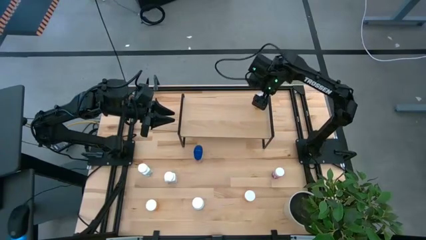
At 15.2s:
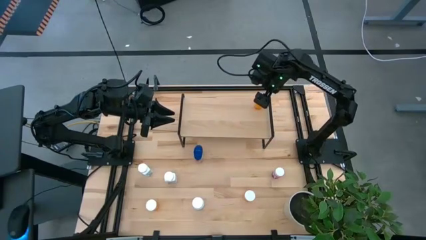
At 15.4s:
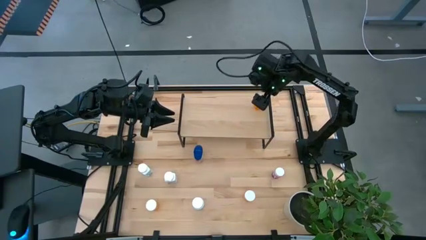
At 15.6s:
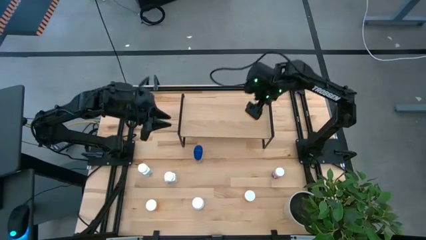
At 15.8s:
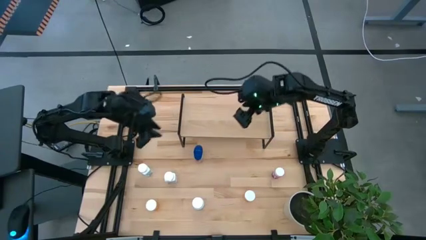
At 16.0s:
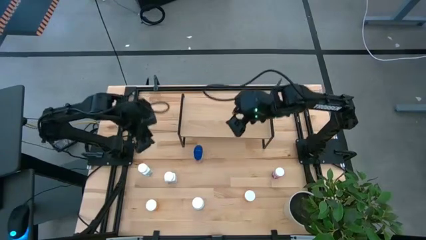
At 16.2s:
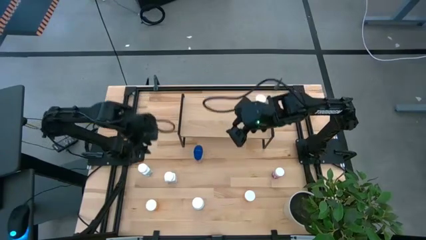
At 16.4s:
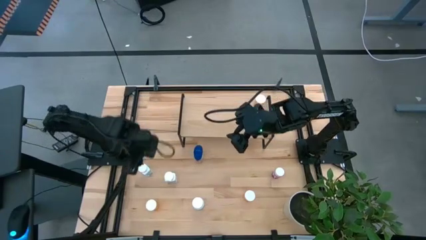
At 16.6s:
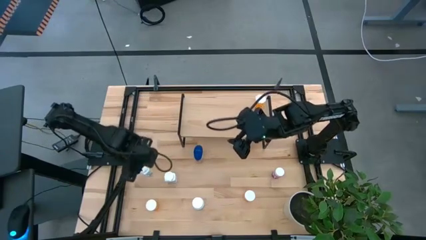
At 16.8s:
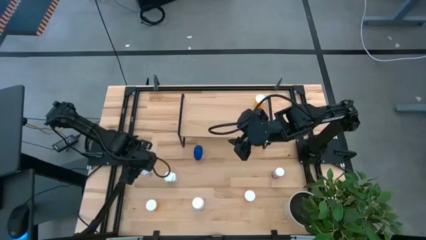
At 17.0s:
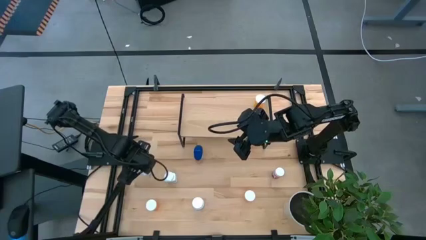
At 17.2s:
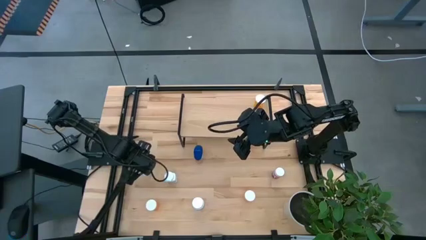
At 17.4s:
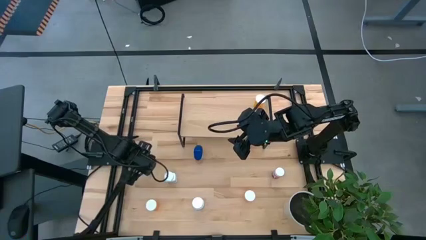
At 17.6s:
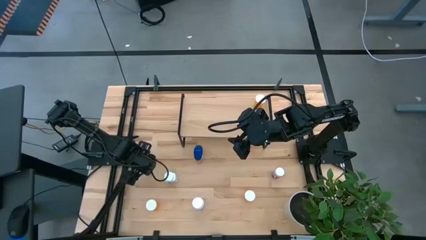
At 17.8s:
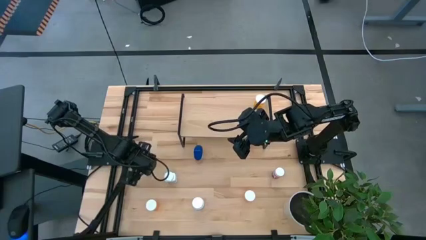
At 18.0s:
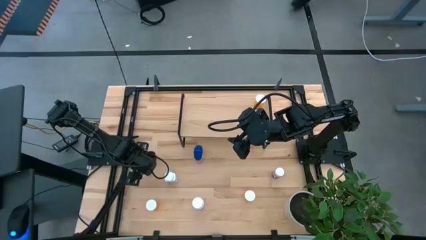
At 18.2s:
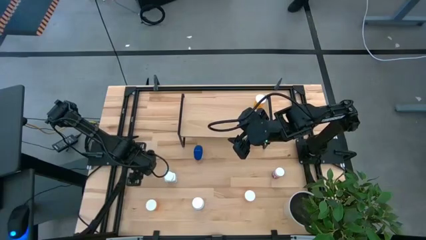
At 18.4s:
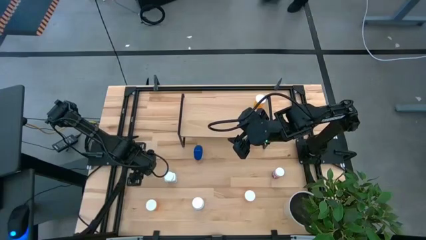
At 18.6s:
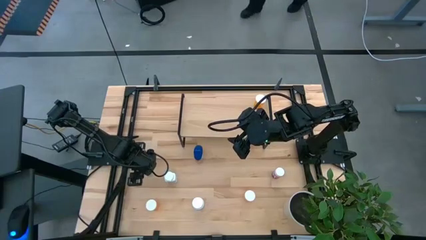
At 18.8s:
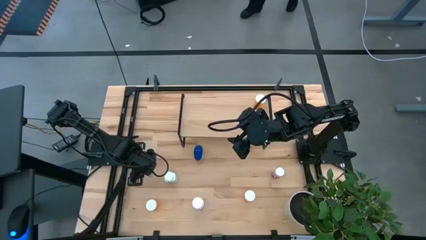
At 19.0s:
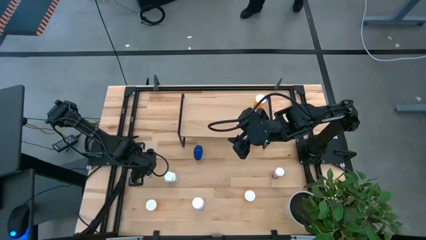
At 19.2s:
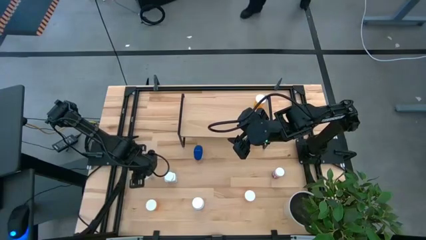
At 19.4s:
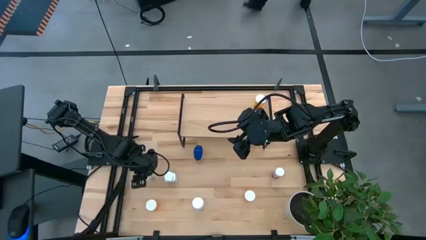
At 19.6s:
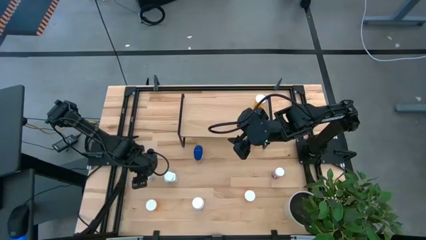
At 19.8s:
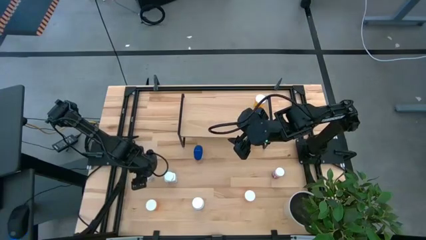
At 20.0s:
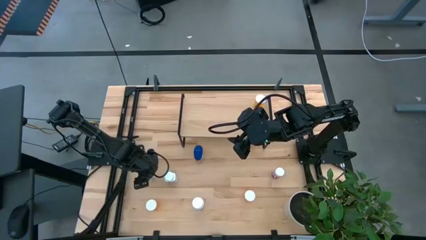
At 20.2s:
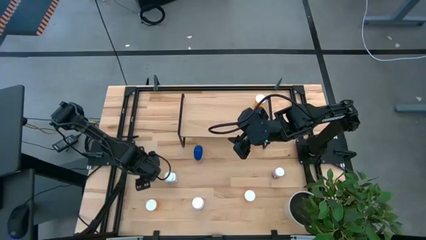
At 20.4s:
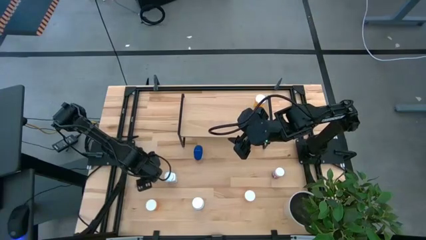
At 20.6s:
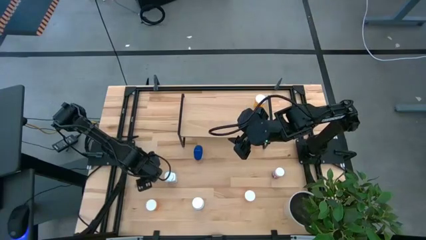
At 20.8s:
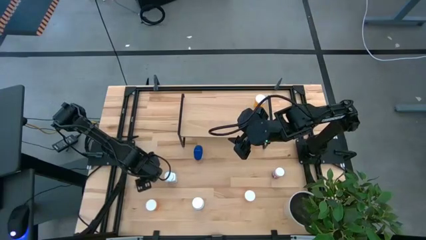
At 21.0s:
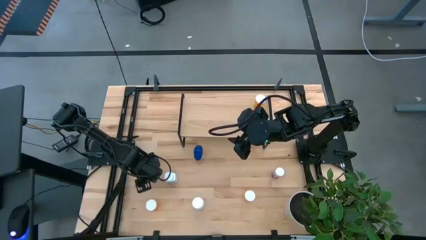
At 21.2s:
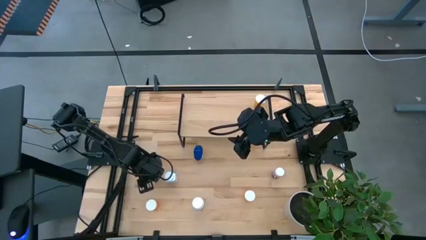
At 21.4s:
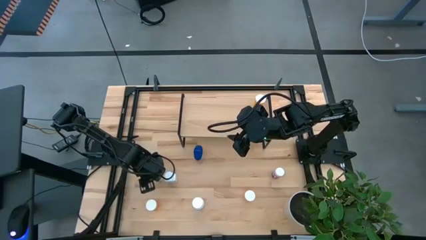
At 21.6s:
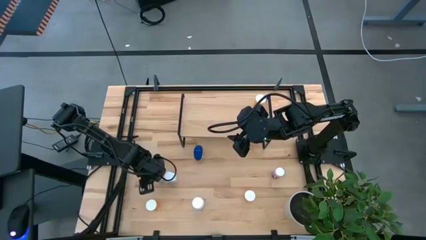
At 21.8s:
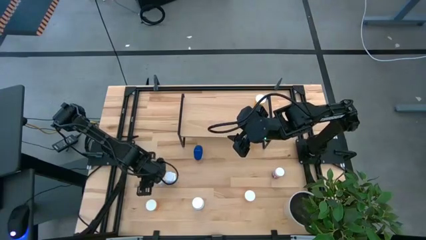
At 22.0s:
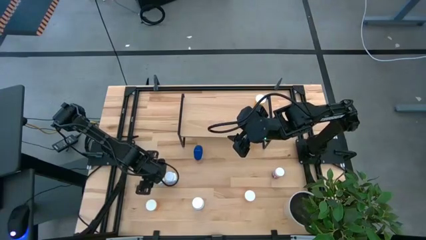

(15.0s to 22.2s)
Task: Pick and place medicine bottles onto shelf by color
Put the left white blue pill bottle on the shelf

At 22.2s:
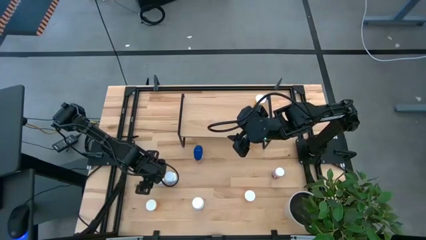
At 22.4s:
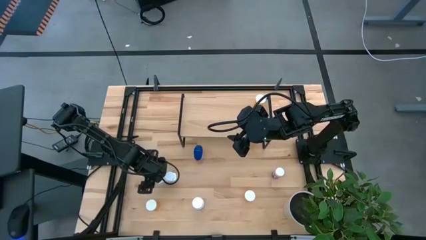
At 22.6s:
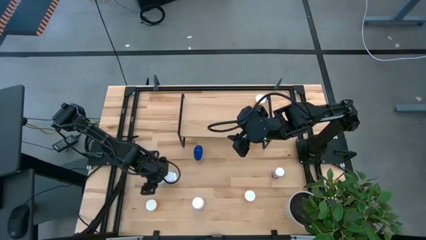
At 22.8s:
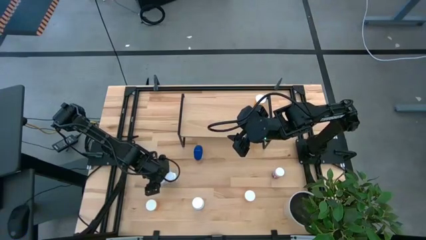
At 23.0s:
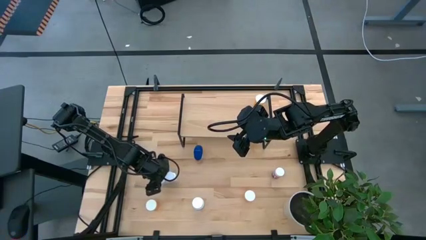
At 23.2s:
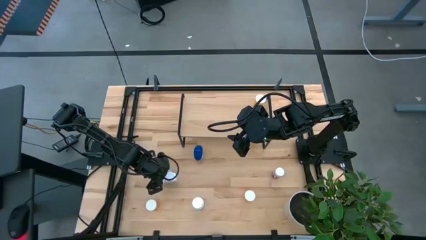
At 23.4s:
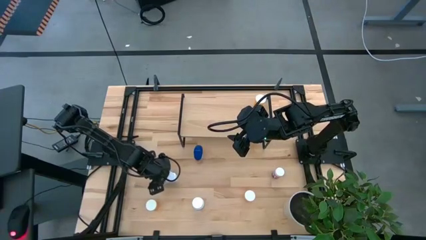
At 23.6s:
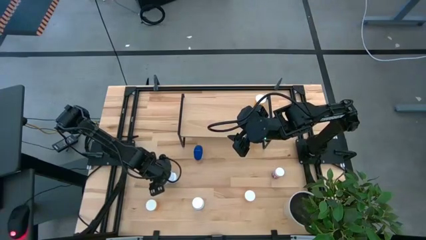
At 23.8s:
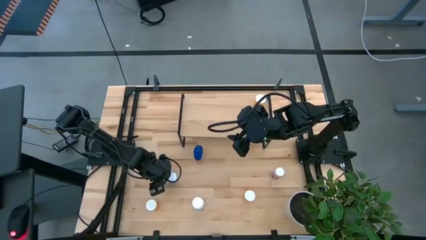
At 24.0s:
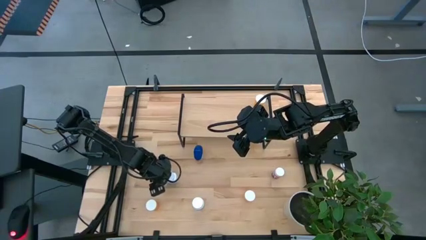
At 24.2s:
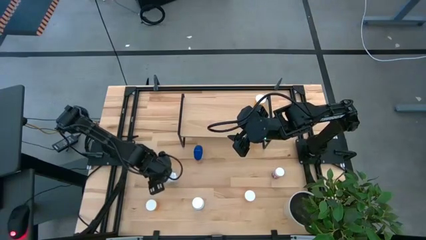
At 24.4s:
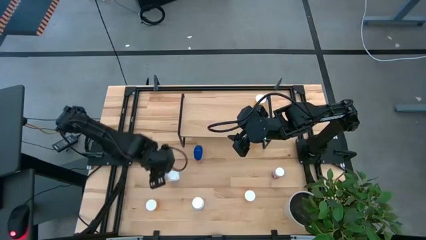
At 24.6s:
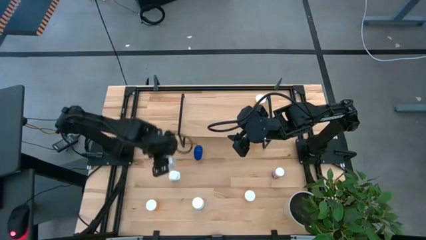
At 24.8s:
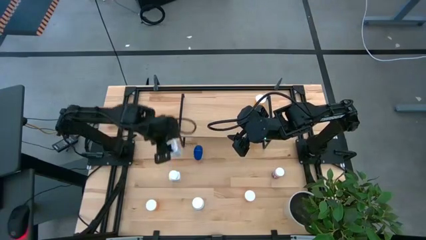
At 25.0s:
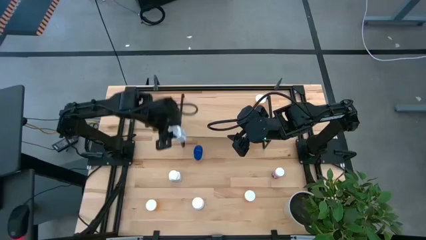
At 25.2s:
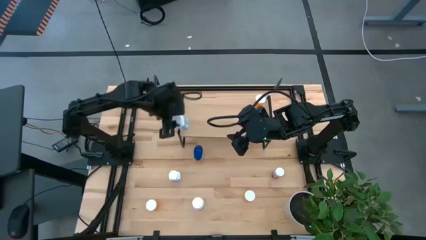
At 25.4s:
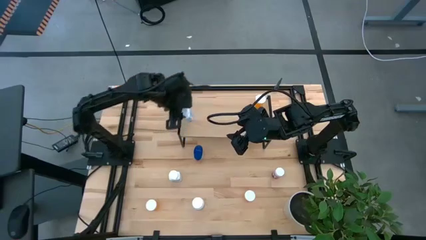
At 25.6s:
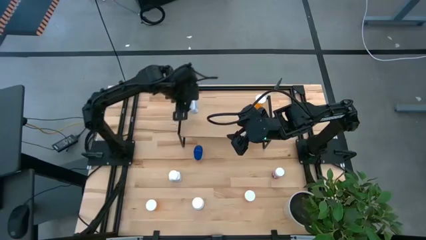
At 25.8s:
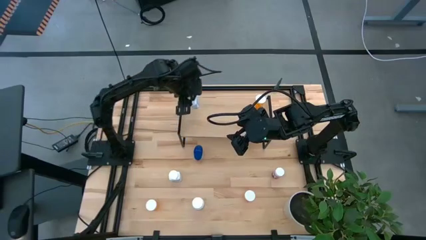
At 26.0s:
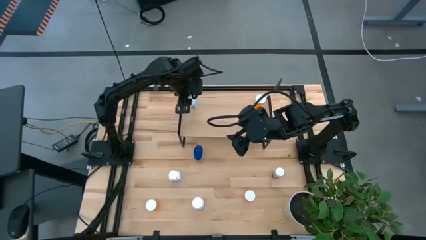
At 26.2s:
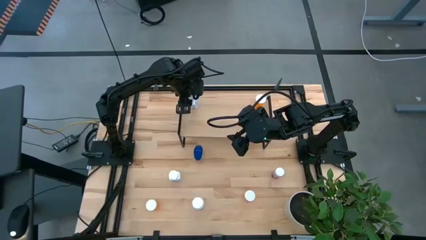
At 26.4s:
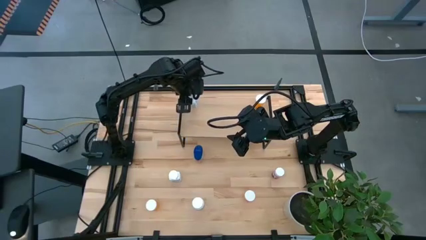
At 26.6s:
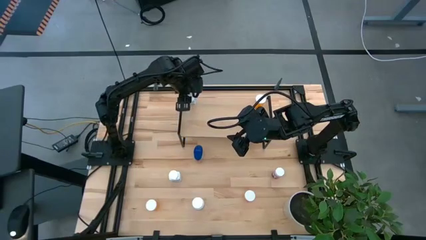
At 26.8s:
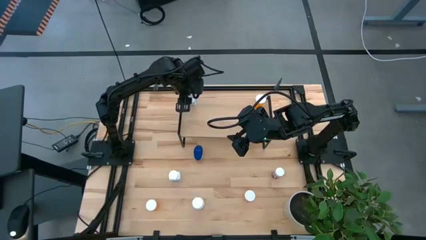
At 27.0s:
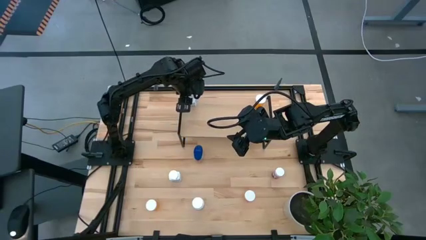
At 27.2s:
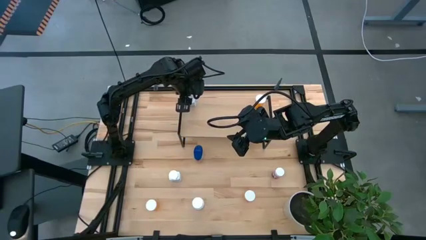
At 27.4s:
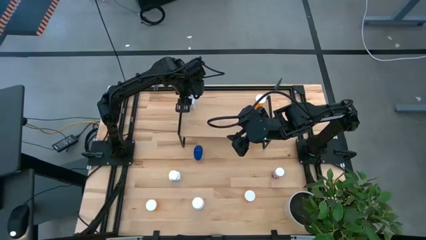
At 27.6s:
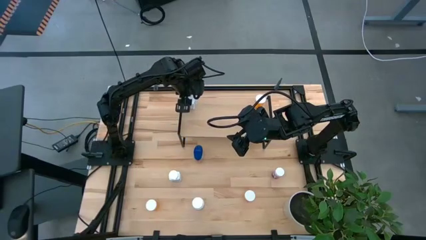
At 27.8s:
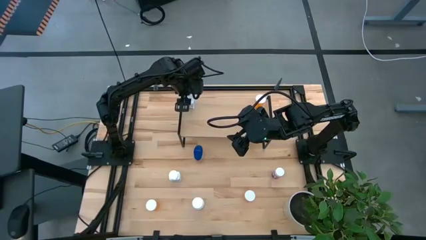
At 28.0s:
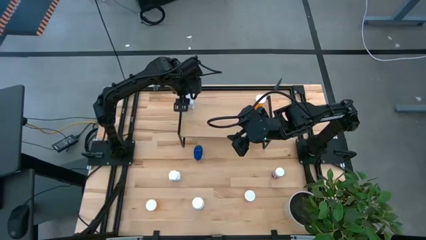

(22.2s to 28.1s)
Put the left white pill bottle on the shelf

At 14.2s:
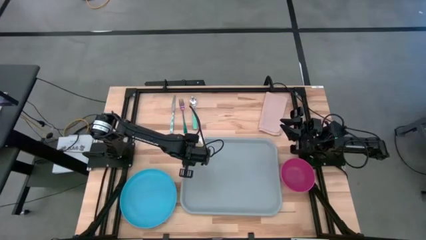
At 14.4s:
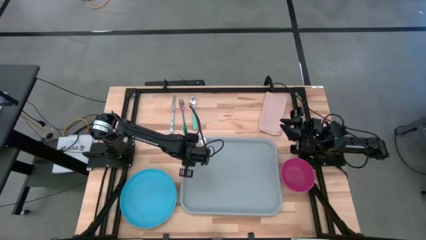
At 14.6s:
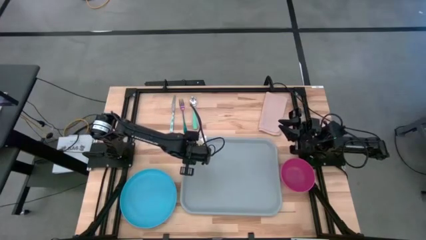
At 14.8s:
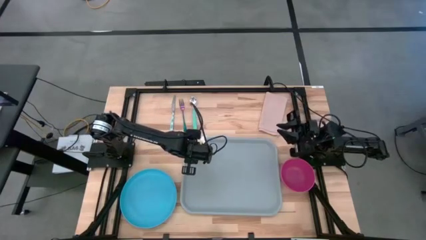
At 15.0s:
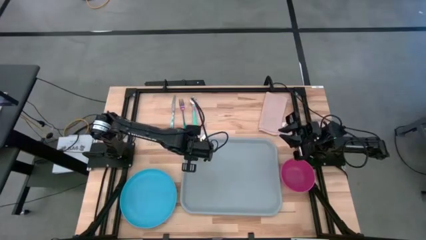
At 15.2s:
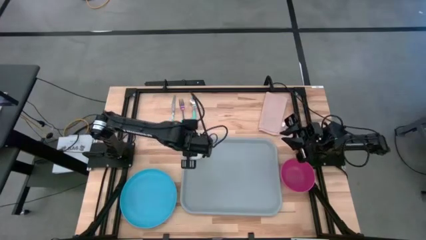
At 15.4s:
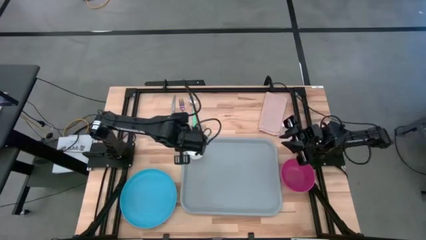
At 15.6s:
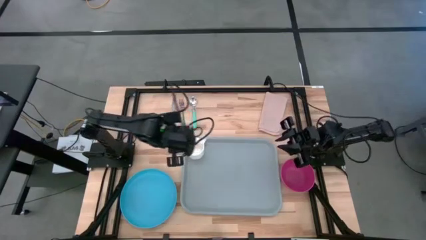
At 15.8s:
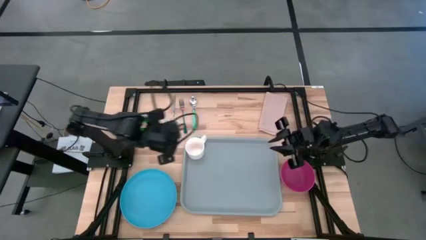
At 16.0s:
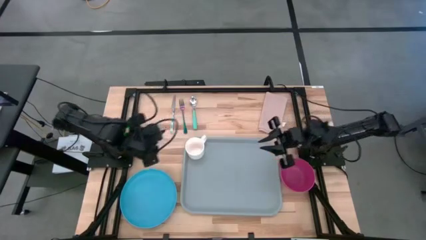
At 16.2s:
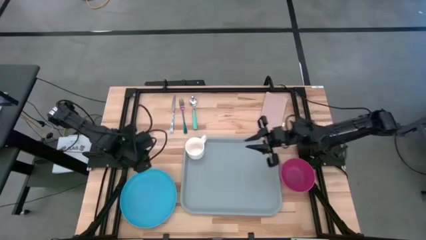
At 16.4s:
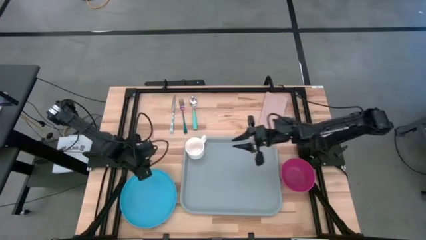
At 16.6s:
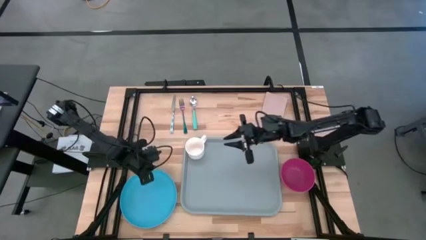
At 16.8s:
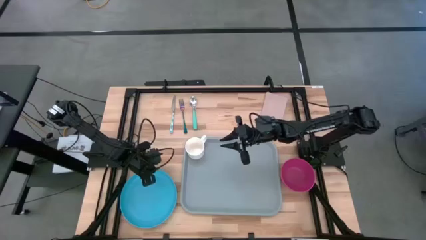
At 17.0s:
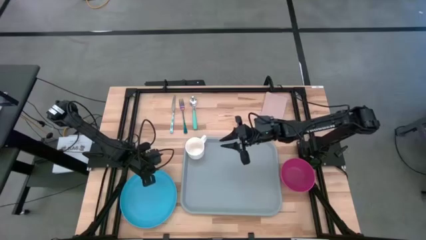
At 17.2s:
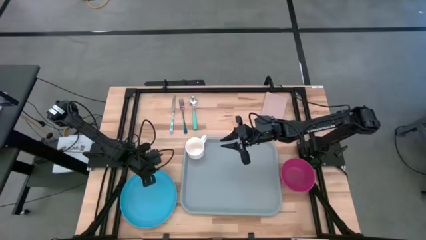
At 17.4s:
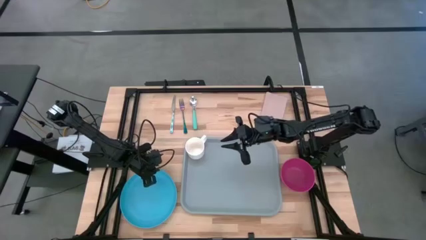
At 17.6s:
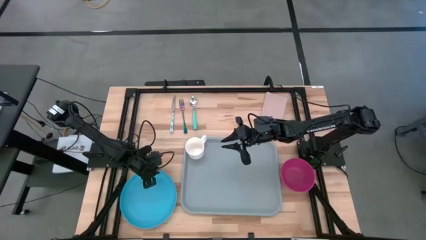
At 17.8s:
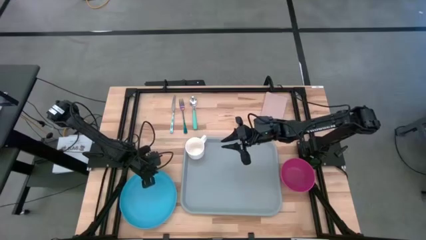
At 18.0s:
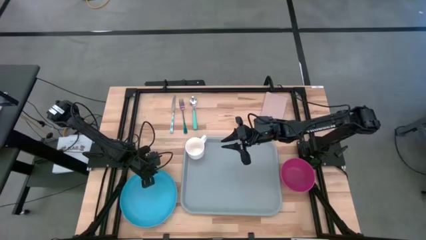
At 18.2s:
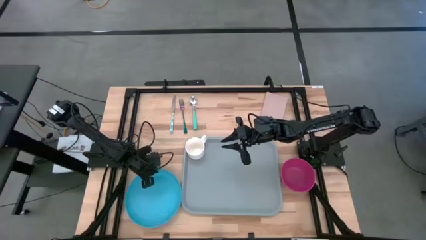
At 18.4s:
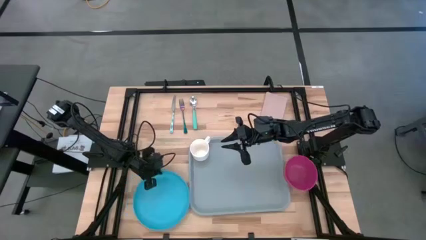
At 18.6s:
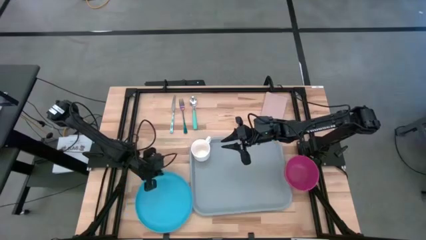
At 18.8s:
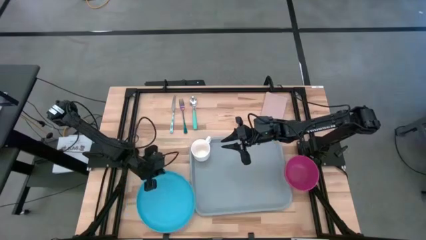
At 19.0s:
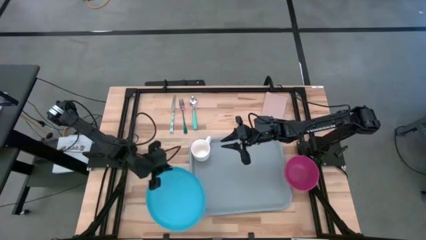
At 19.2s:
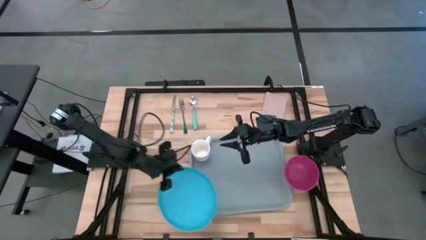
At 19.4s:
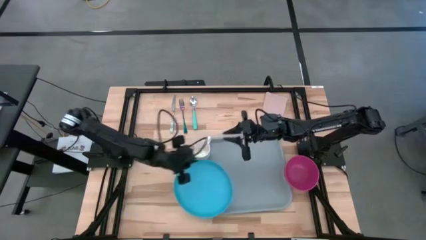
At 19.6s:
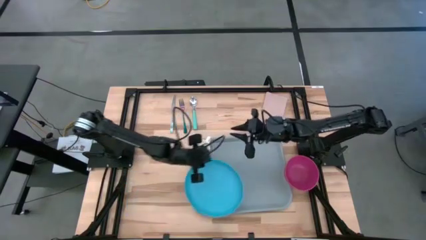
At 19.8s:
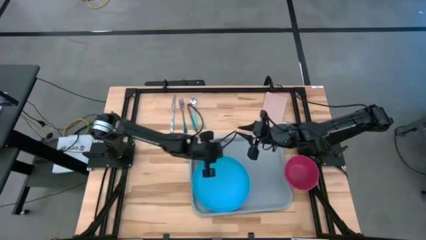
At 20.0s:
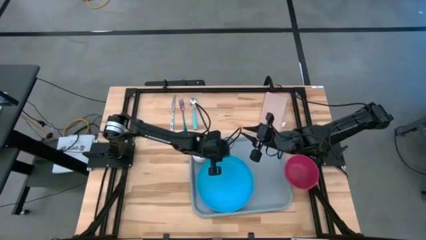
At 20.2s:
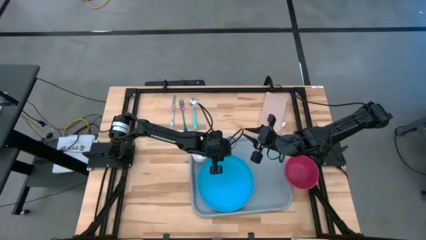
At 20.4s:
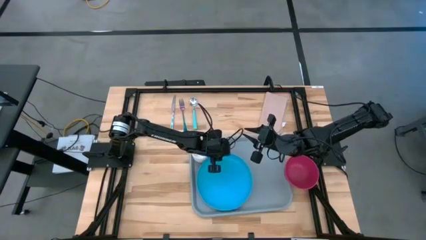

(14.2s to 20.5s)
Task: Set up tray
Put the blue plate on the gray serving tray to the bottom right of the white mug
